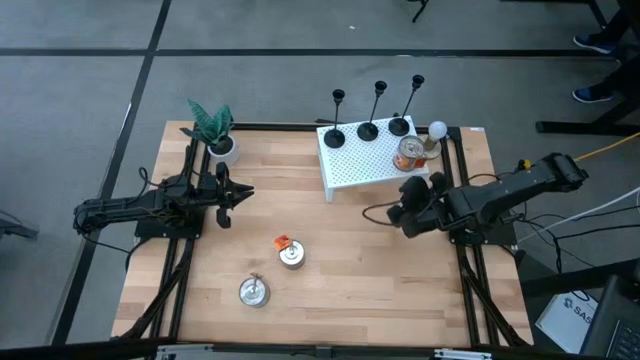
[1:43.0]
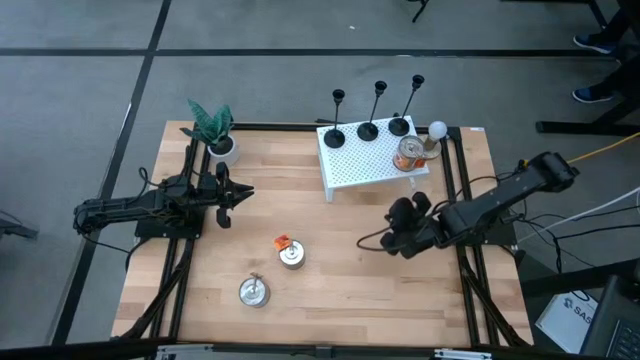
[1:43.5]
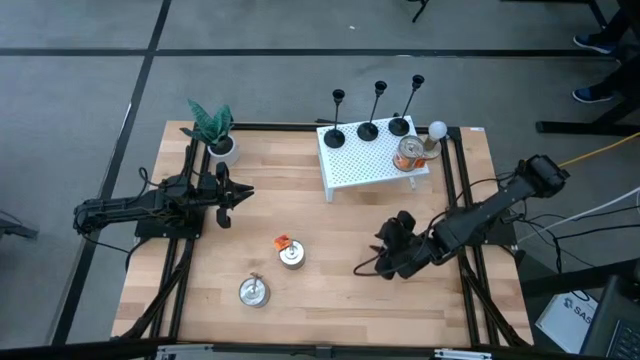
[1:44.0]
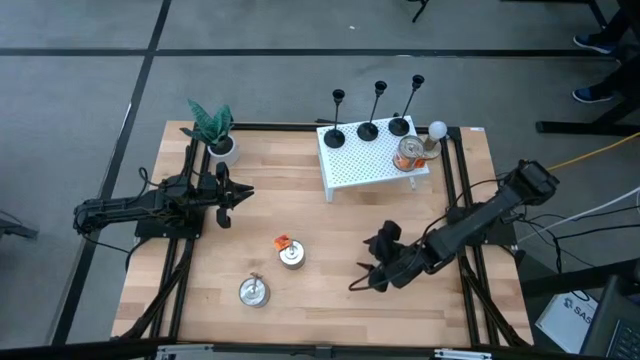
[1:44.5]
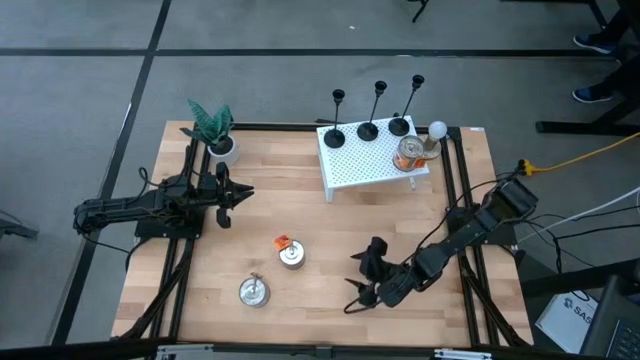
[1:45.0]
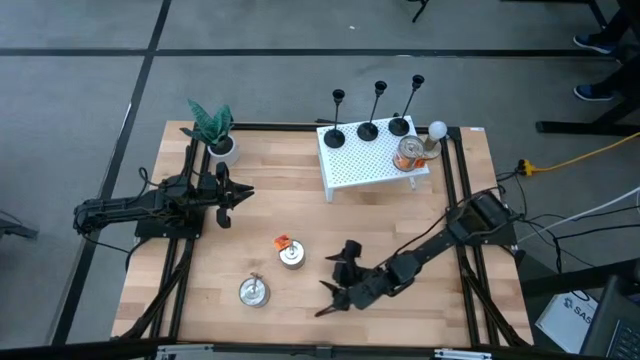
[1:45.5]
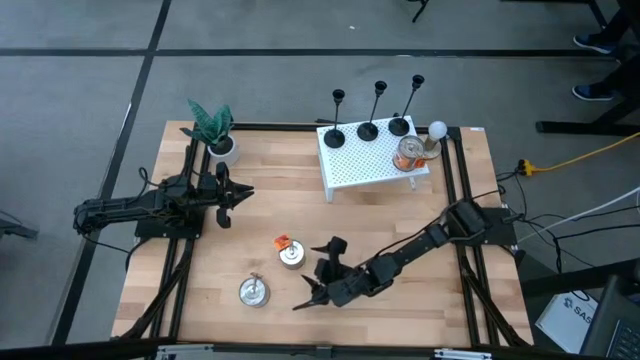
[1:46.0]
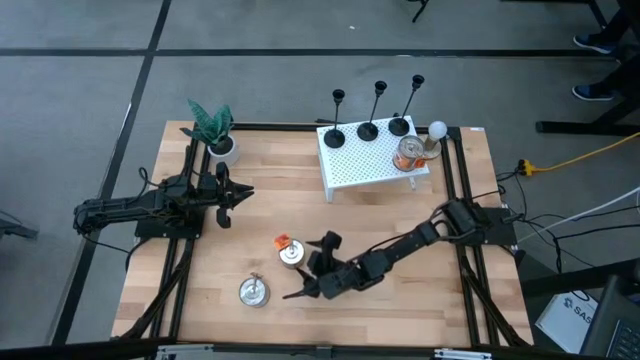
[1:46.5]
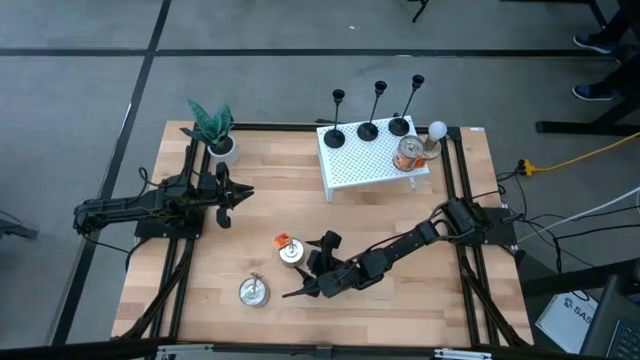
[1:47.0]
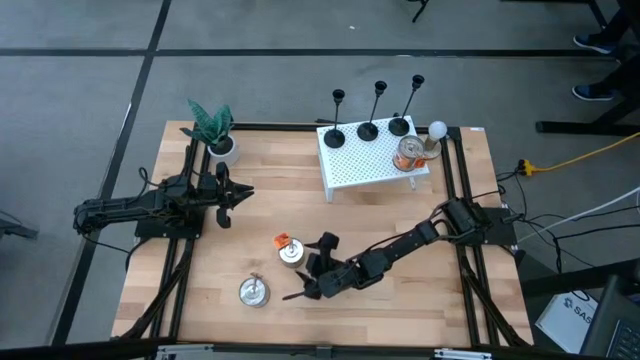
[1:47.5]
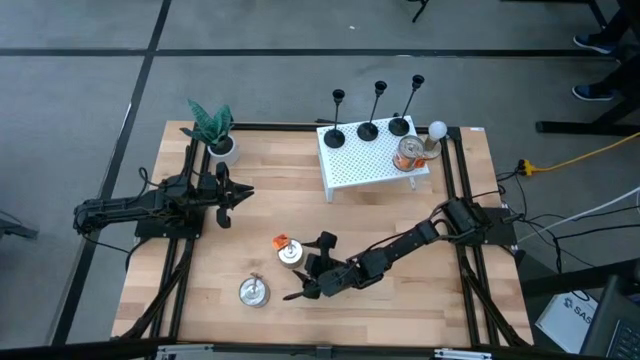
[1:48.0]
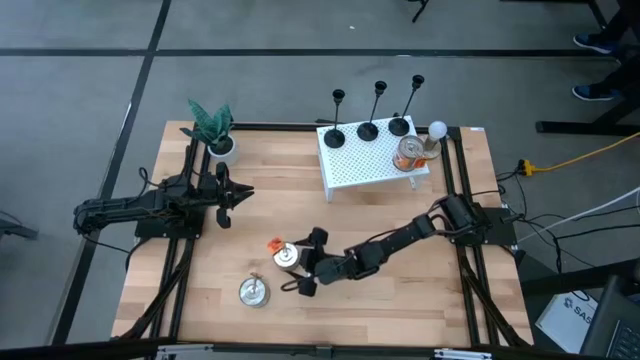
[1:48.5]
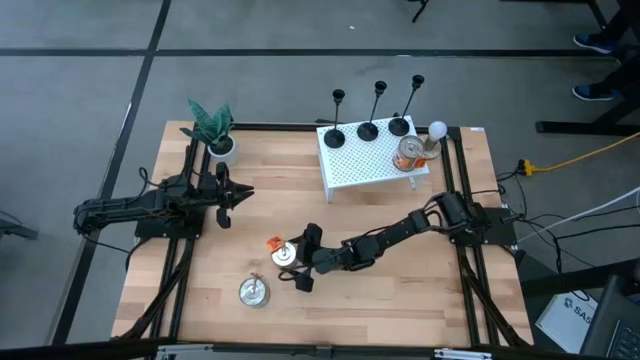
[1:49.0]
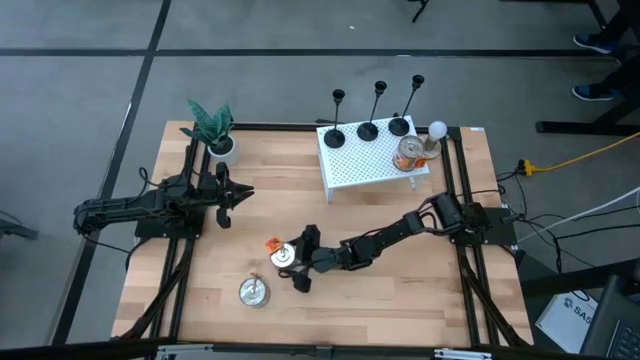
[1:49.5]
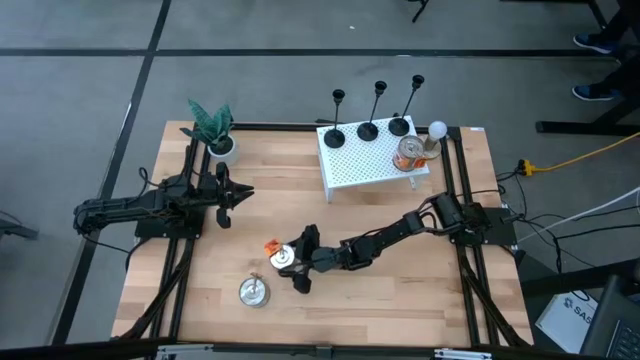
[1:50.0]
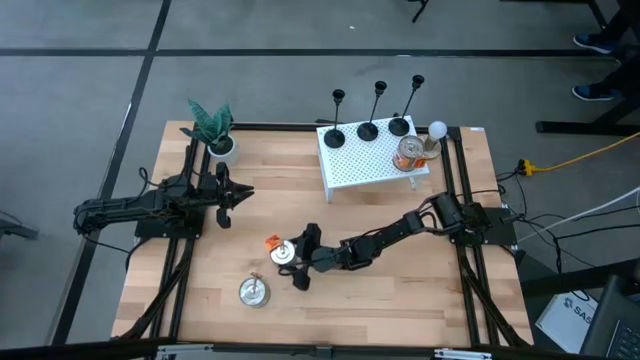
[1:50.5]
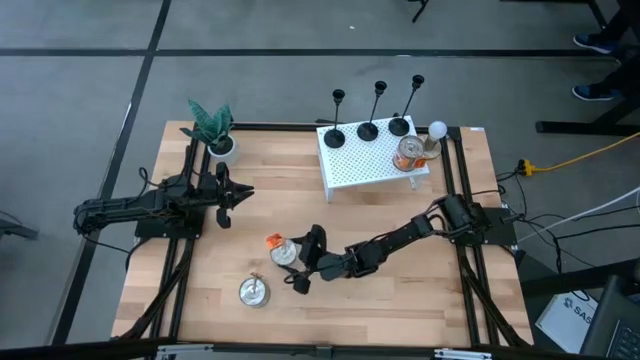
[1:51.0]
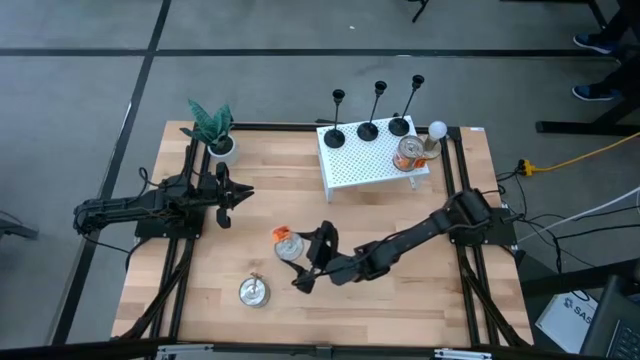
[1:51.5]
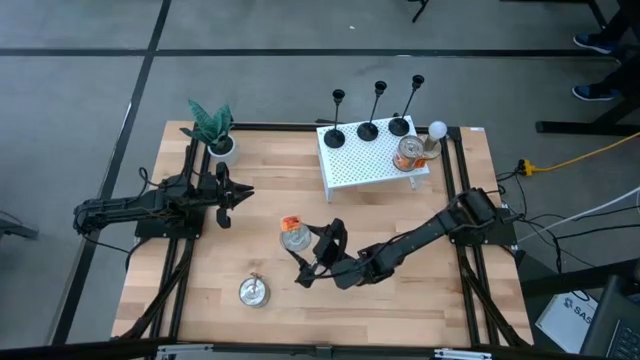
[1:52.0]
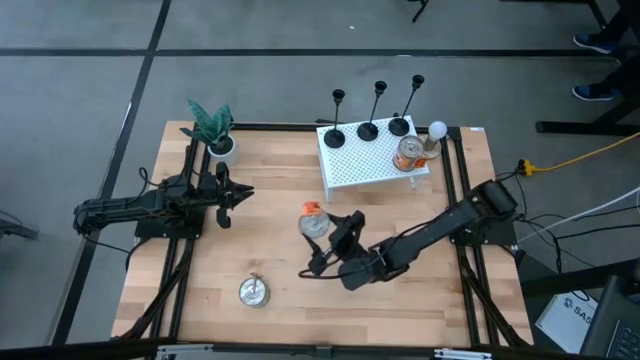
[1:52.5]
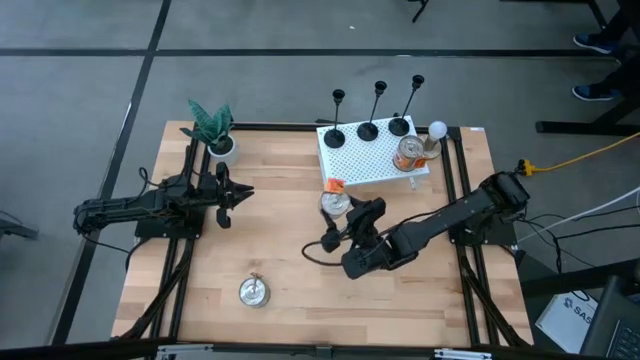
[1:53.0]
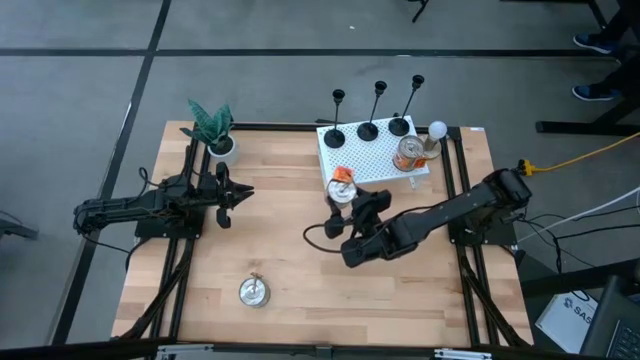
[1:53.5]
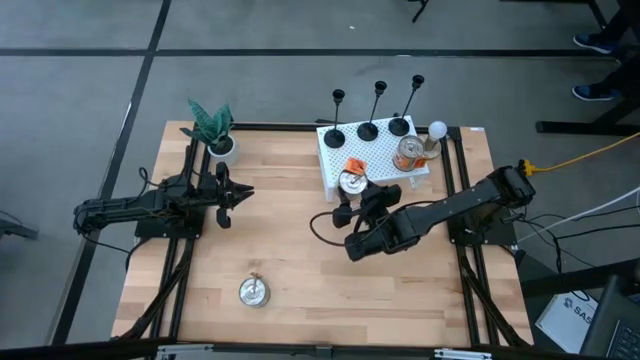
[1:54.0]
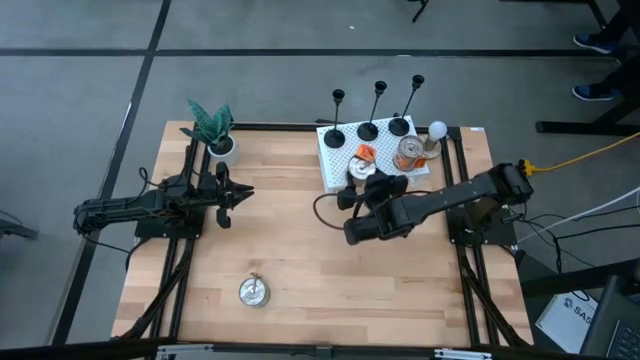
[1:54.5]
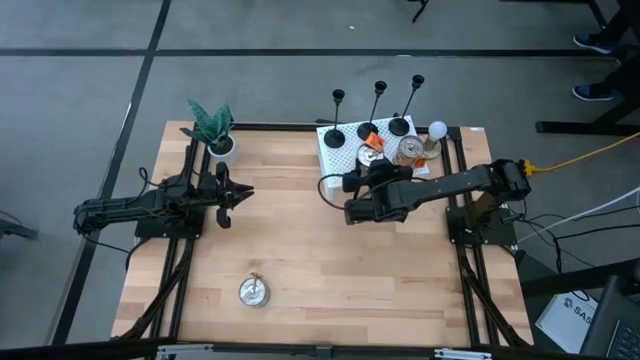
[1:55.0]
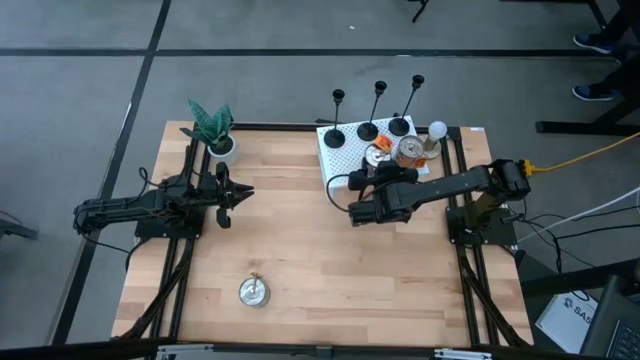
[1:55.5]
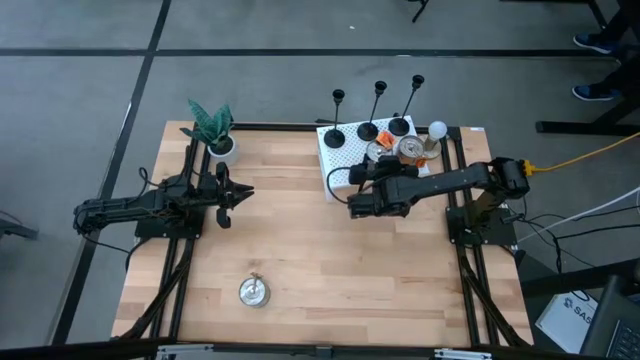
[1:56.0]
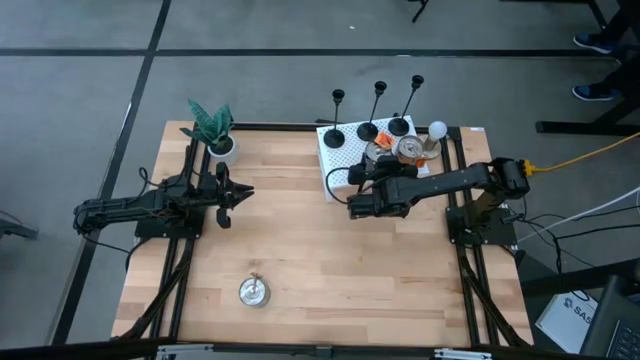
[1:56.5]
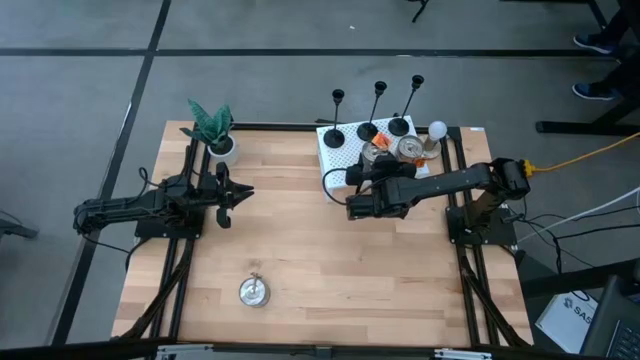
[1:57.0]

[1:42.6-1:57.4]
Task: Pick & Place candle stick holders
Put the orange scented candle on the shelf aligned with the other orange scented candle

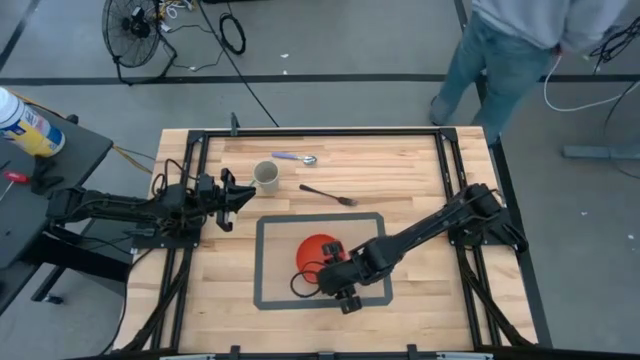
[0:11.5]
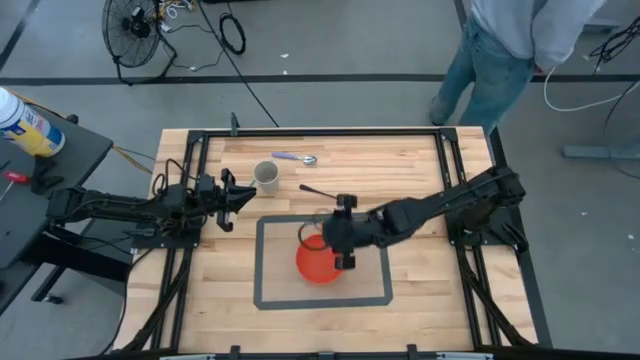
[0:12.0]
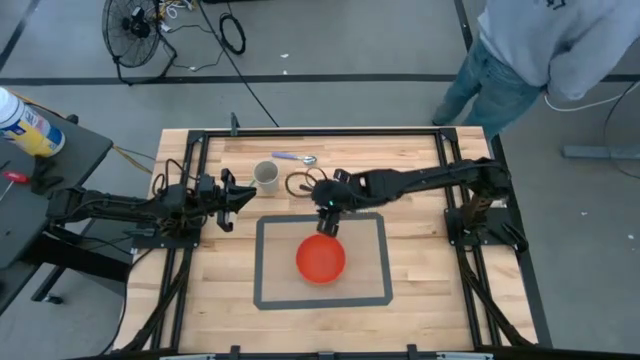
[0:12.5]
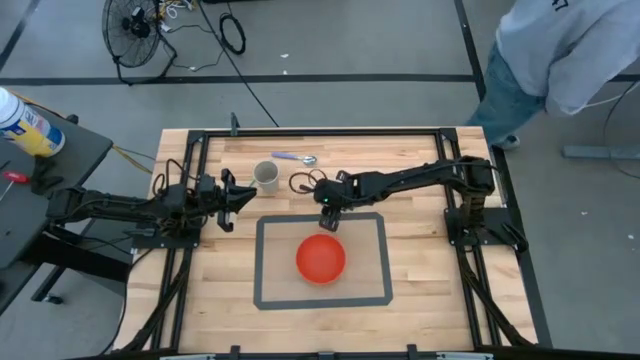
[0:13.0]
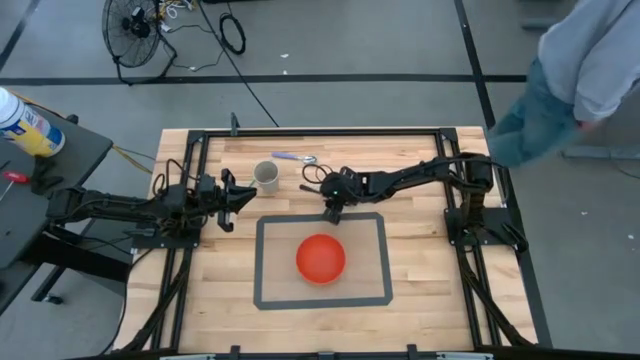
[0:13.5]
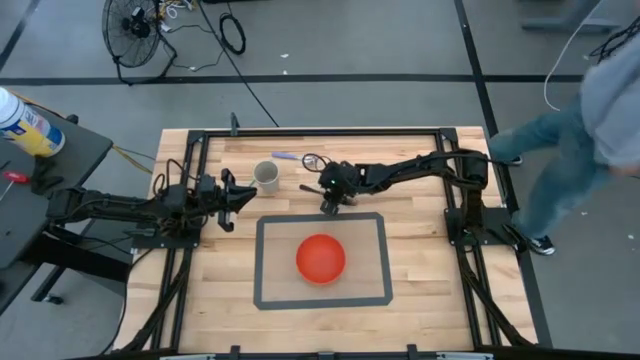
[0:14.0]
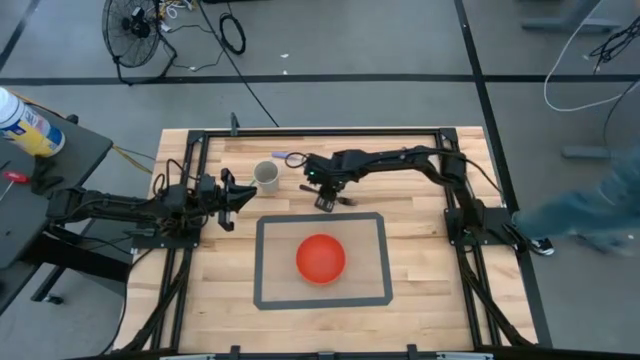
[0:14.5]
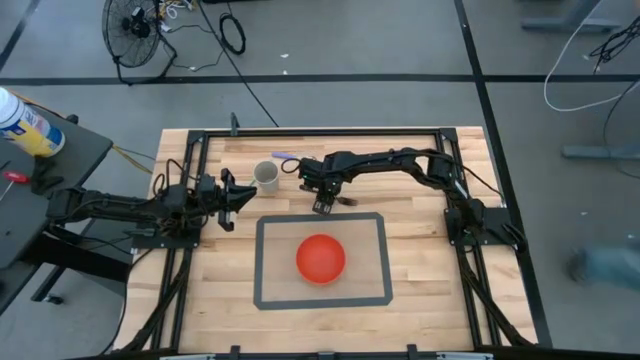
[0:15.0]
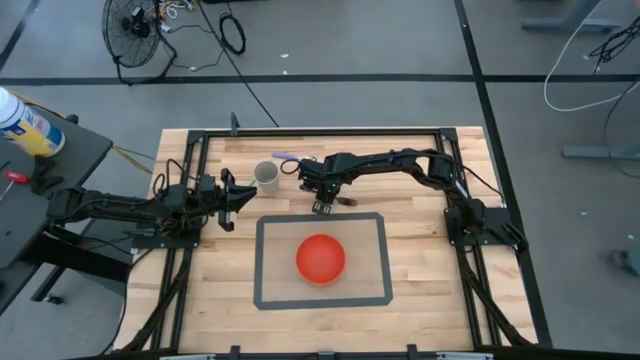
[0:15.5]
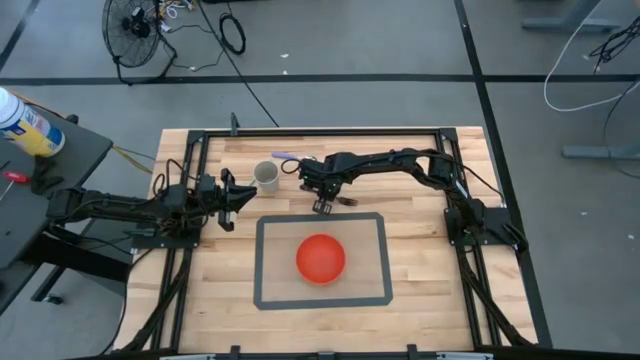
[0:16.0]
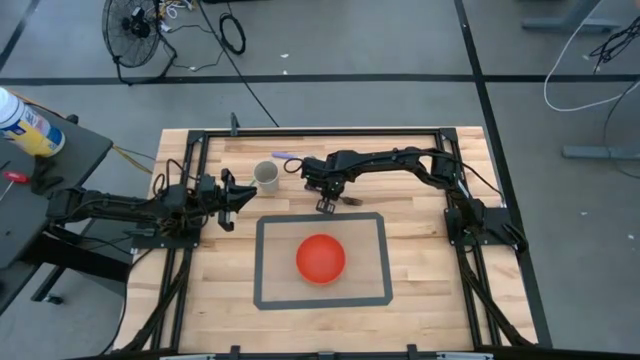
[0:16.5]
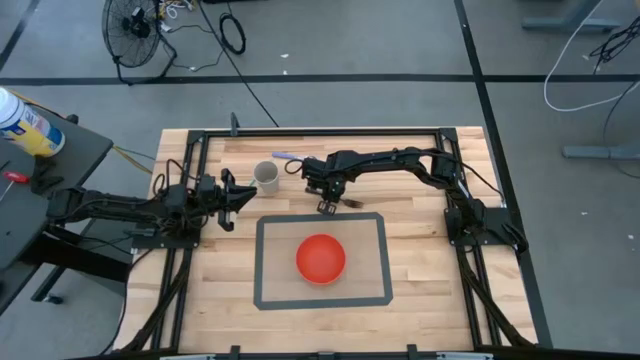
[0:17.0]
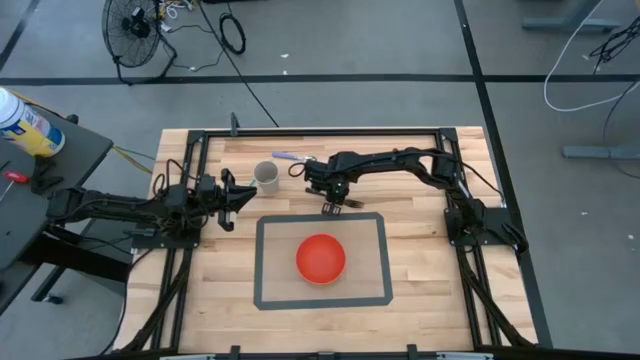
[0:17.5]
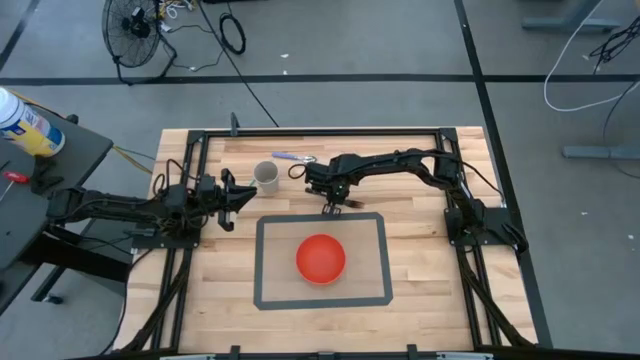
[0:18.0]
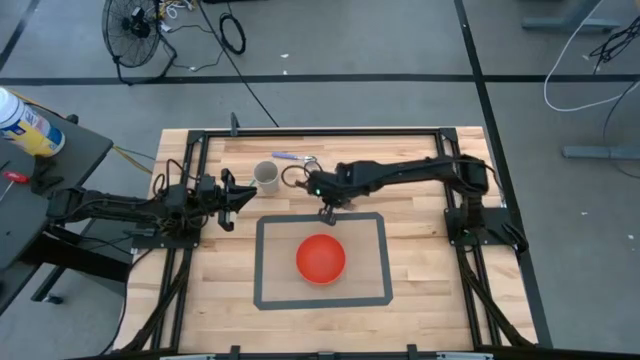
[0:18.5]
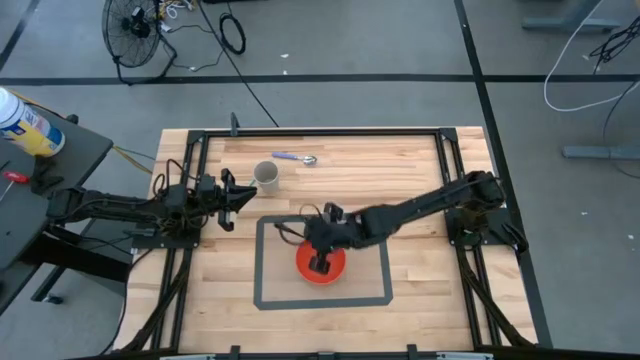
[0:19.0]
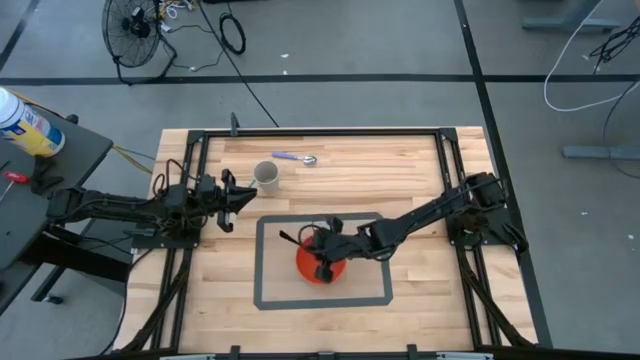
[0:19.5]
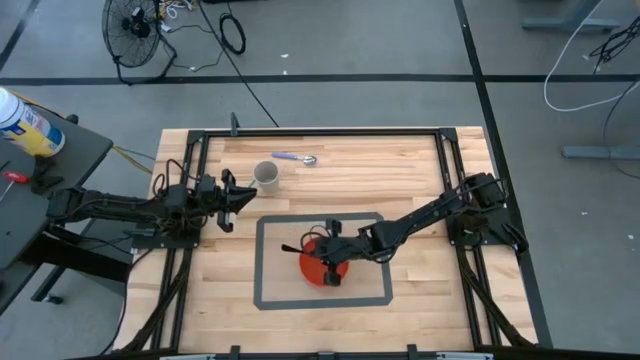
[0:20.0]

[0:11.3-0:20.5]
Task: Pick & Place Utensil
Put the black fork into the orange bowl on the brown table mat
